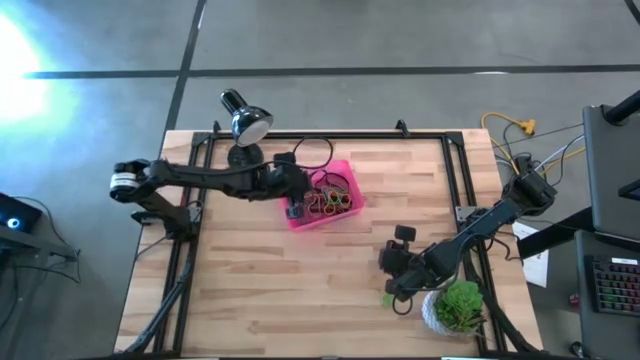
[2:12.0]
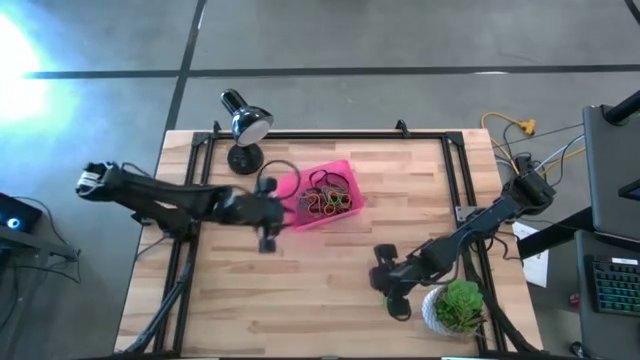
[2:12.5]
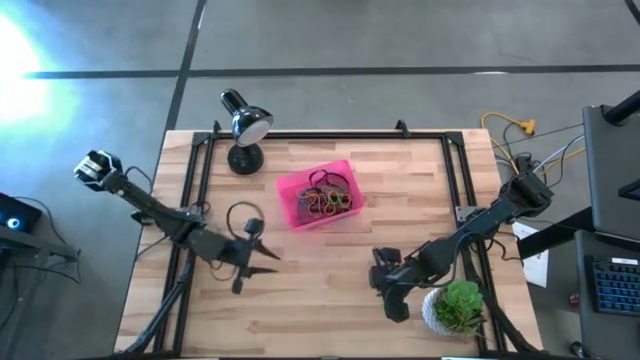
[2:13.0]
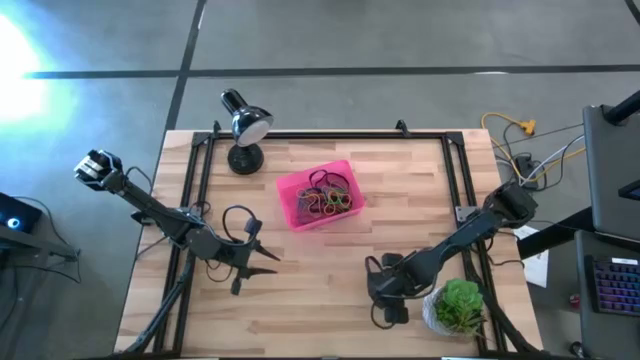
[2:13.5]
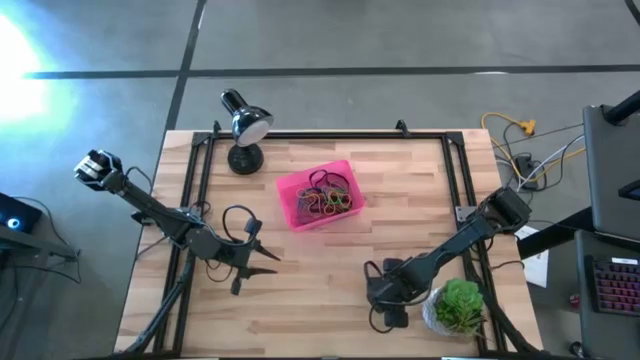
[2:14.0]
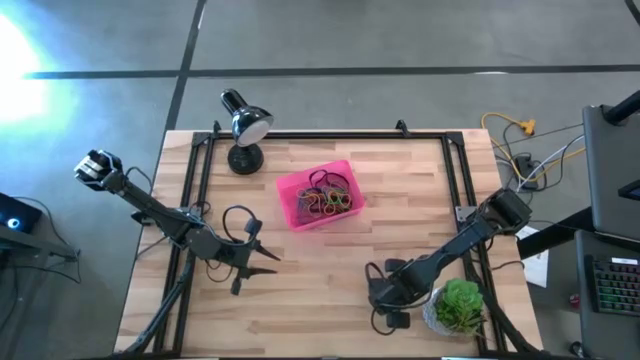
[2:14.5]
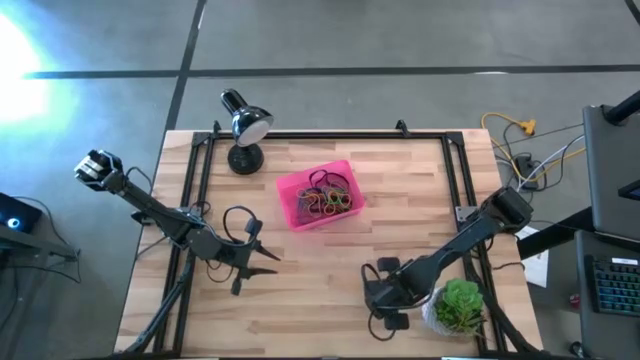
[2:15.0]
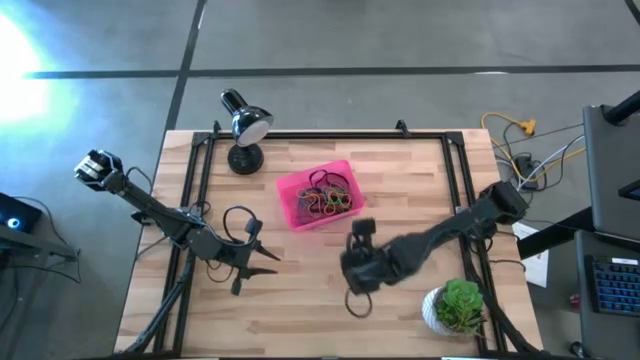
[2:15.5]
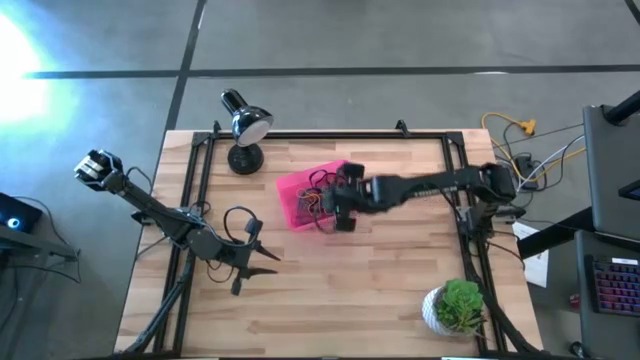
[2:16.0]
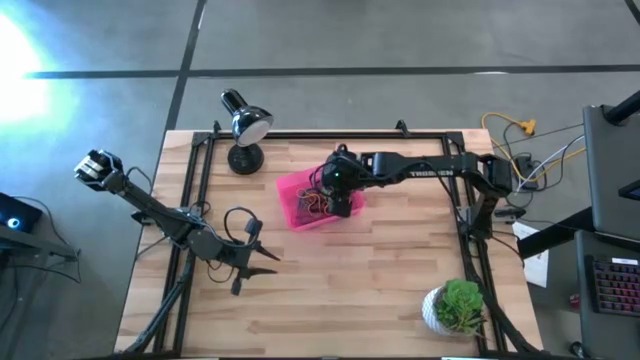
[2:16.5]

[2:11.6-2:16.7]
Task: Pick and place rubber bands into bin
Put the green rubber band into the red bin

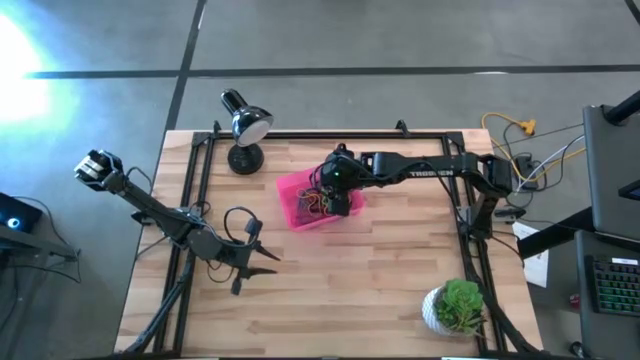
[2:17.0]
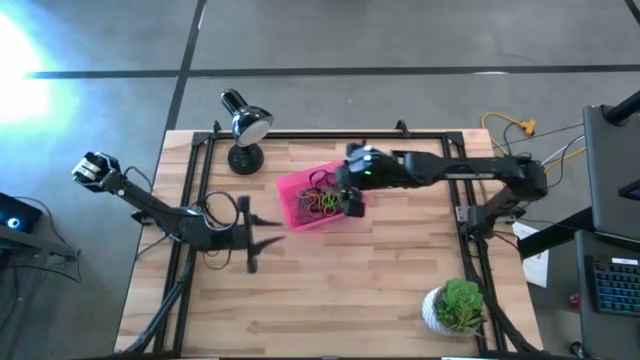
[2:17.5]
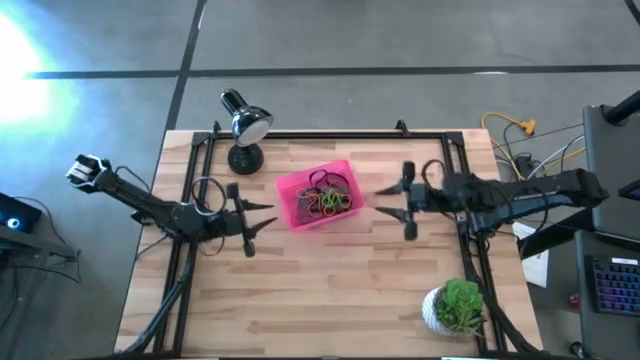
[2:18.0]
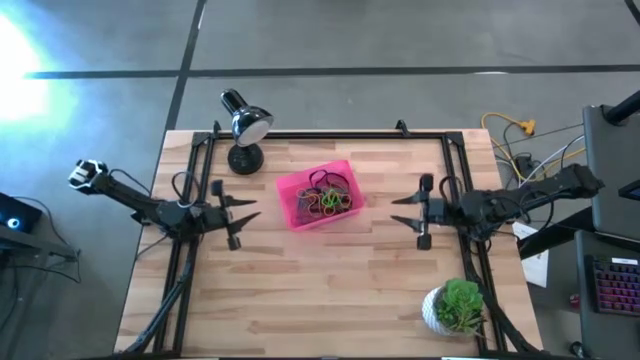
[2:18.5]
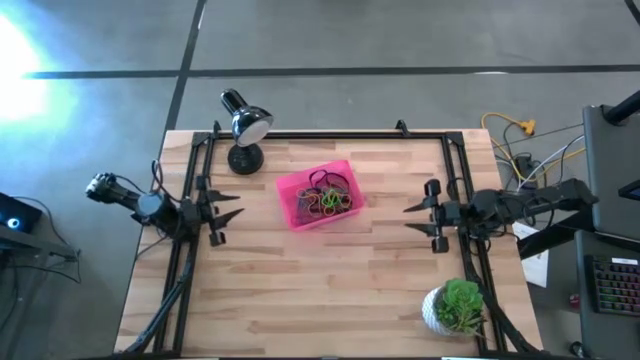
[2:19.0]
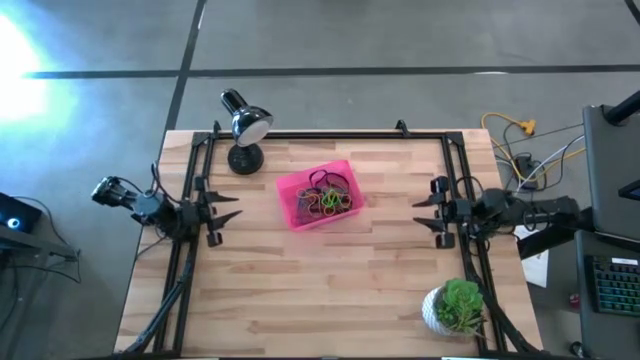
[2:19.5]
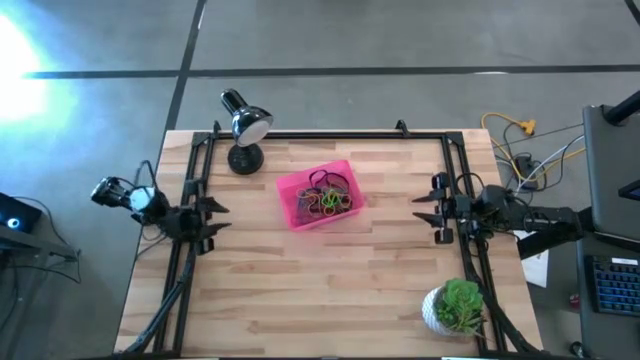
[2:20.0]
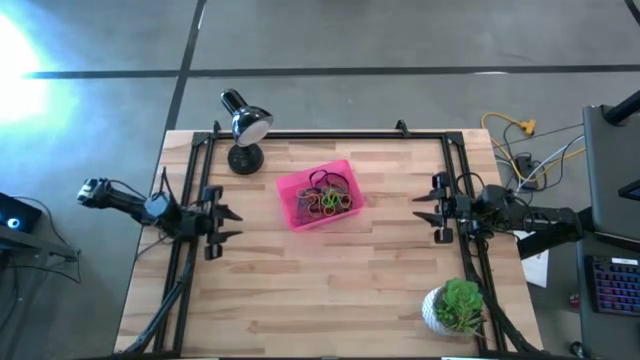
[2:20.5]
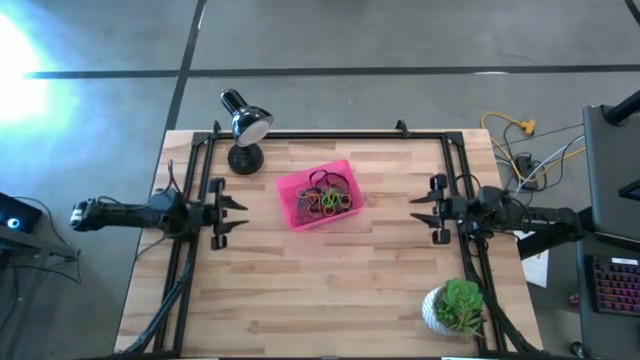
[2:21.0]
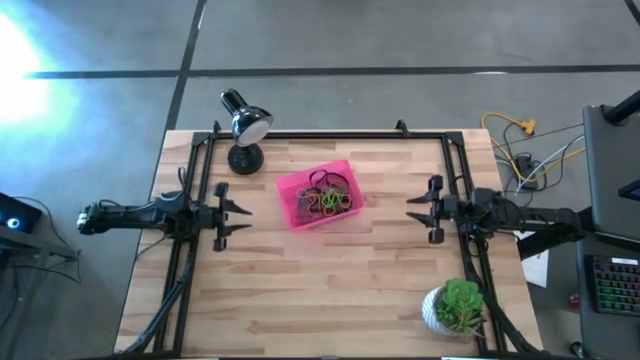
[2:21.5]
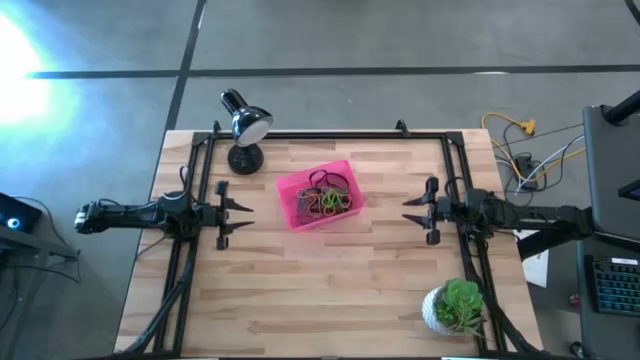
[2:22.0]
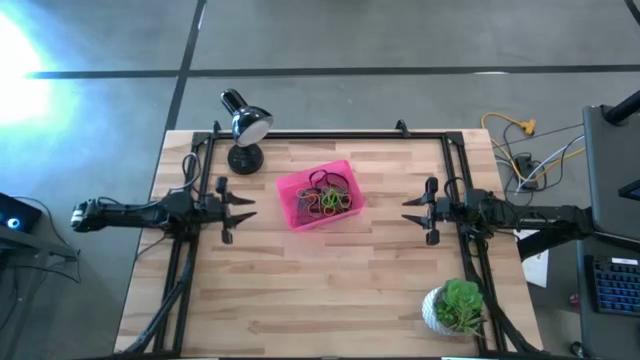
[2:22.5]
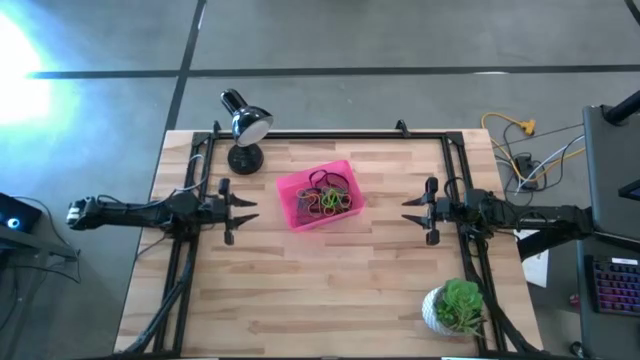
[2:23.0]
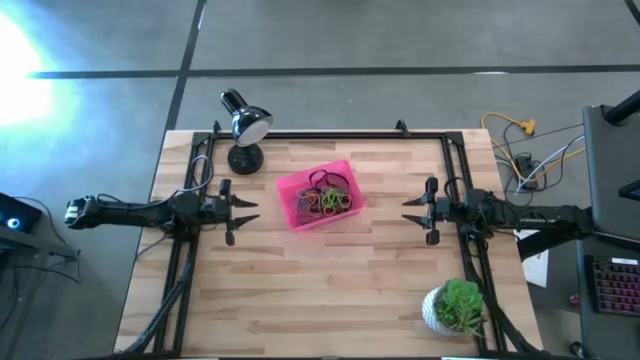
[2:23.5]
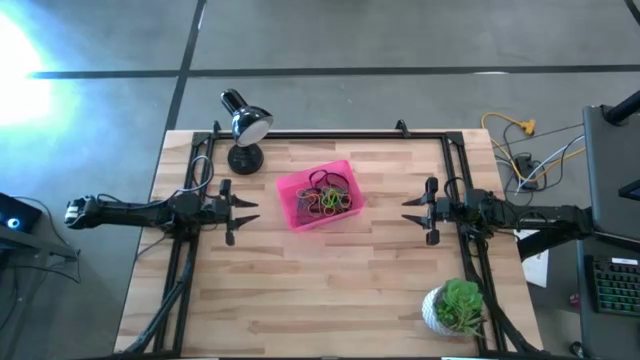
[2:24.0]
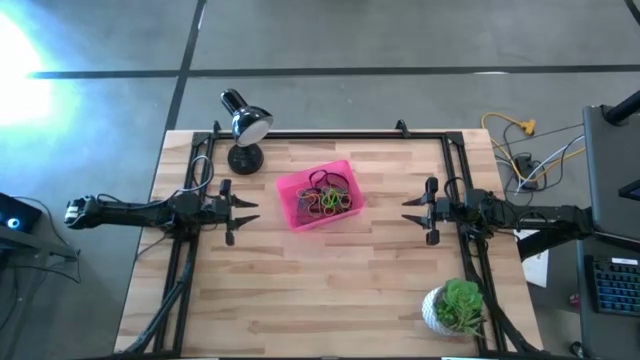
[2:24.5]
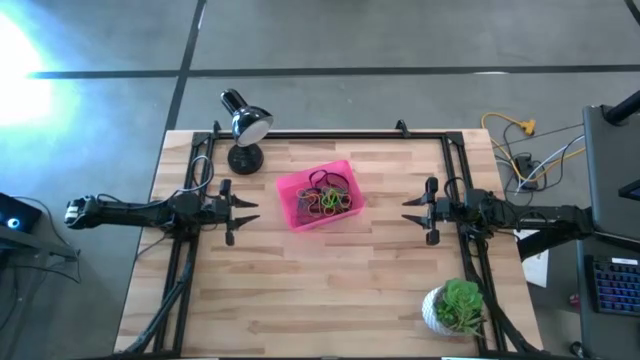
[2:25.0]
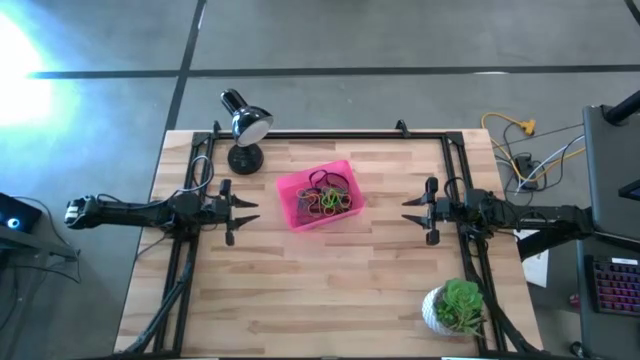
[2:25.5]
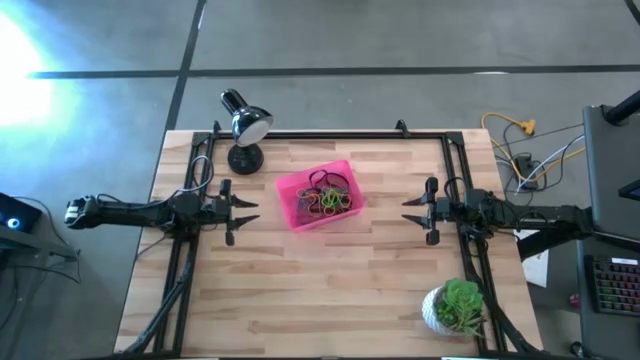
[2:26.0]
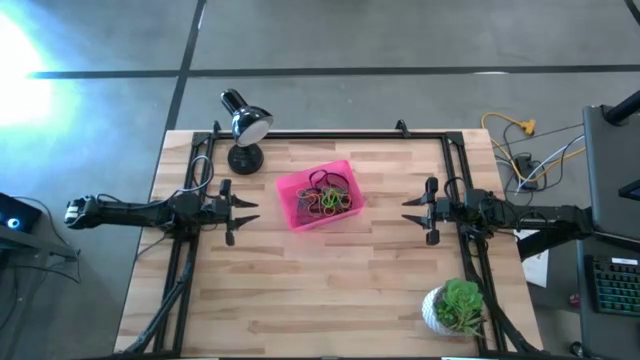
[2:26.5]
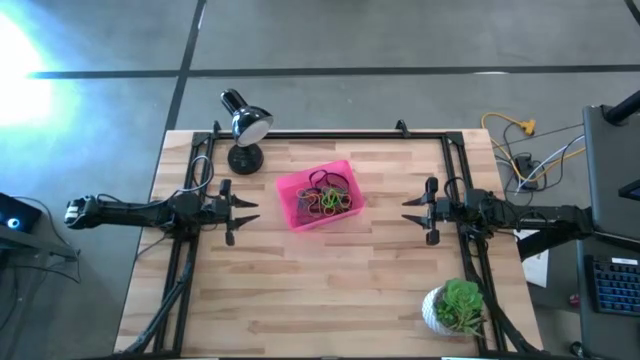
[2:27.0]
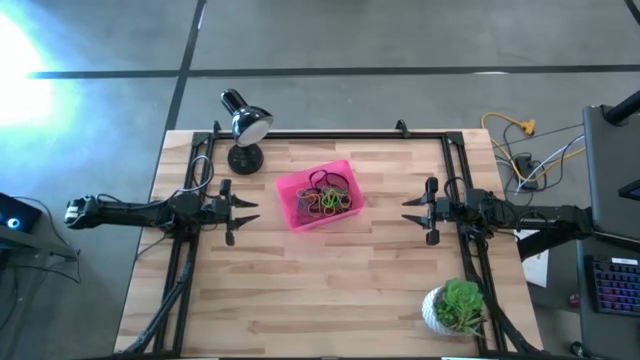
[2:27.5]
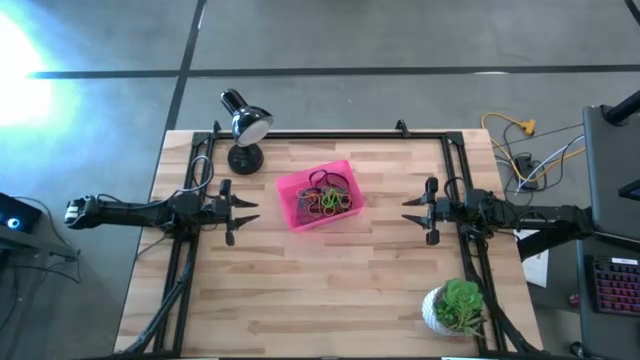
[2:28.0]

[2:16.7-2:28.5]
Return to Home Position

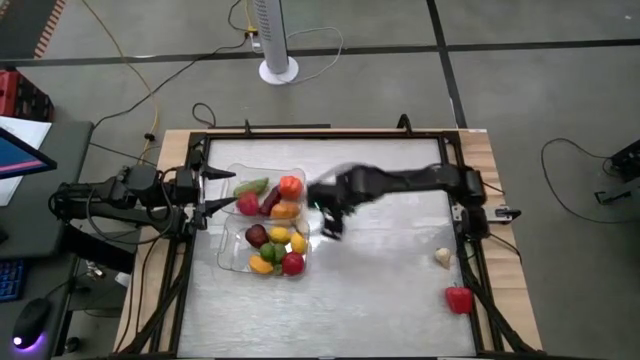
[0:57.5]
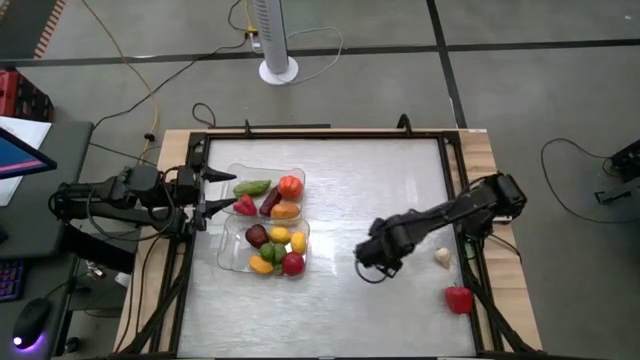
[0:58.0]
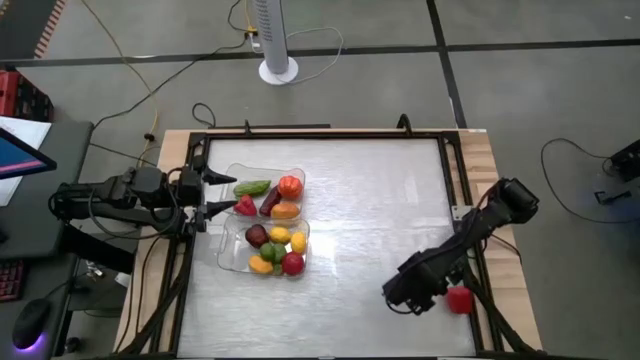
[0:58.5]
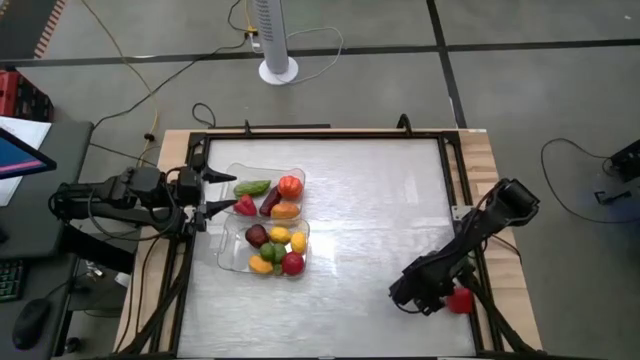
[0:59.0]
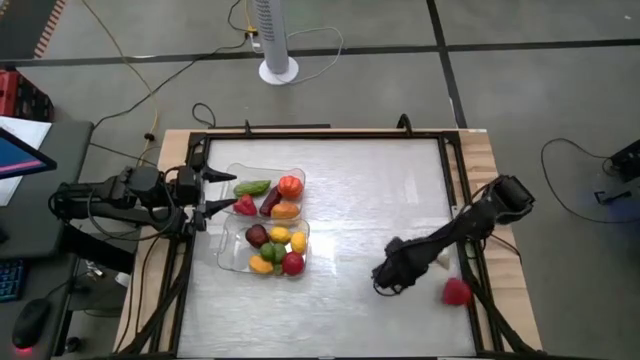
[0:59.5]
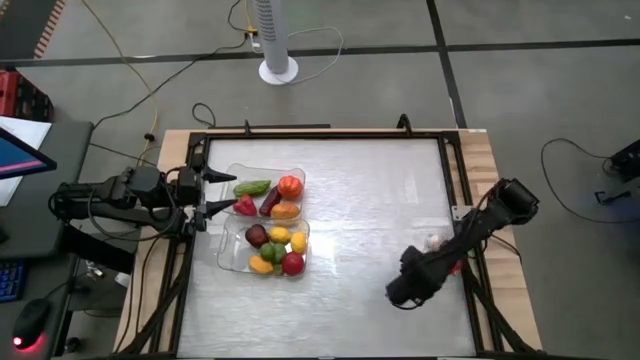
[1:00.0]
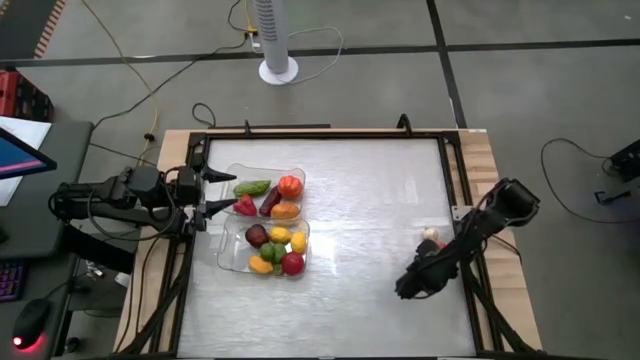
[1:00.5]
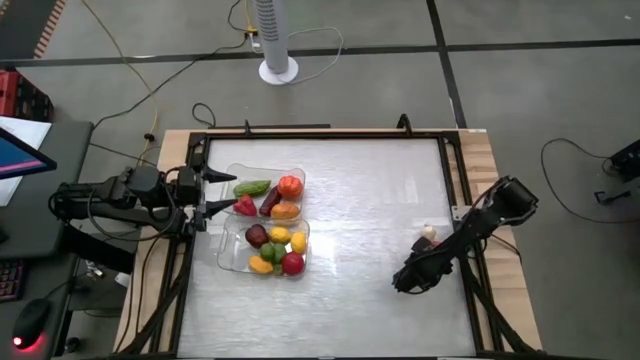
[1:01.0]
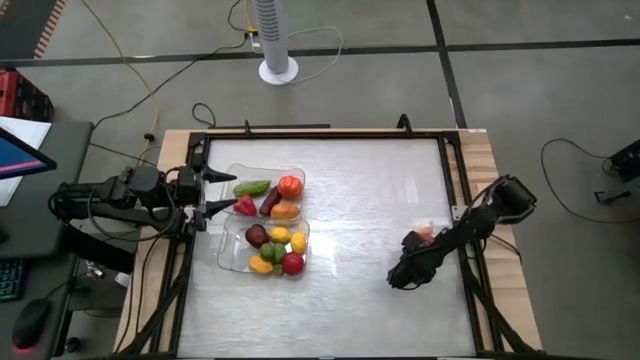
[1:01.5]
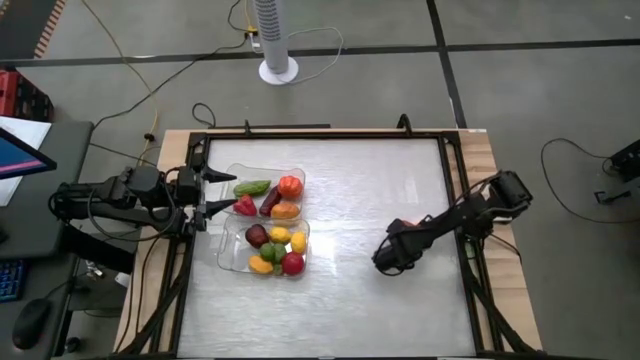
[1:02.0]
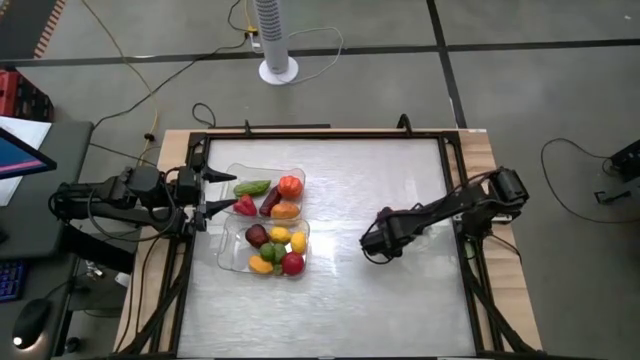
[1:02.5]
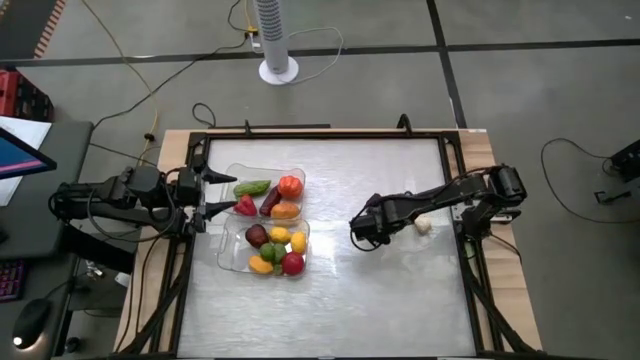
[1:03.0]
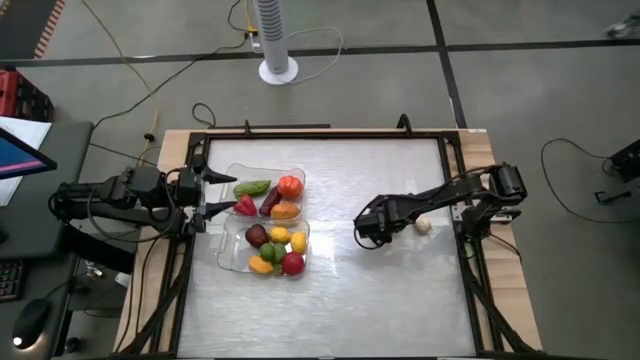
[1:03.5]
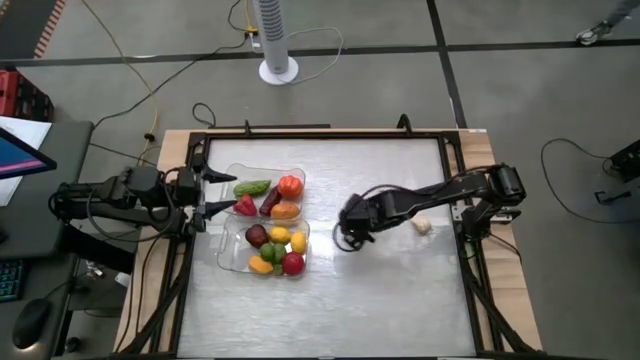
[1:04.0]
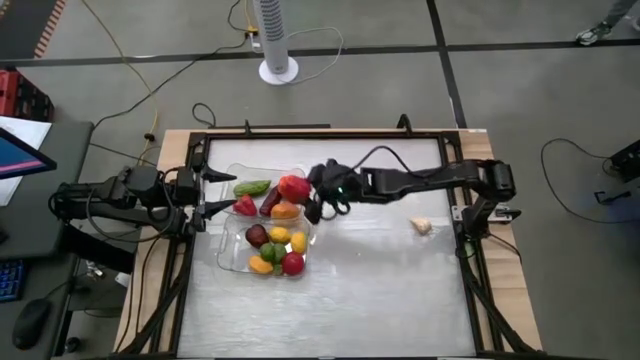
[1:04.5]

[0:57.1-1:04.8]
Task: Sort produce into baskets
Put the red bell pepper into the top transparent bin
